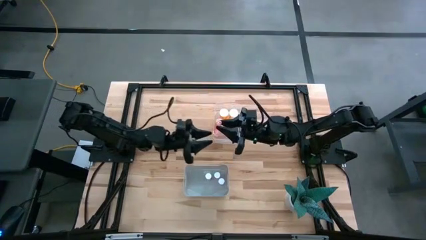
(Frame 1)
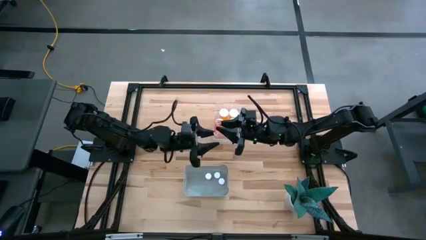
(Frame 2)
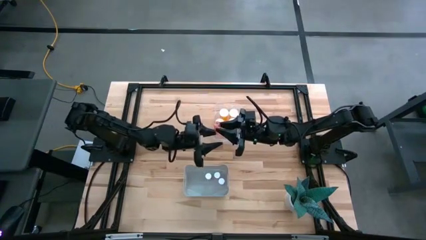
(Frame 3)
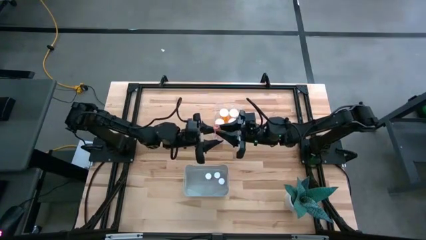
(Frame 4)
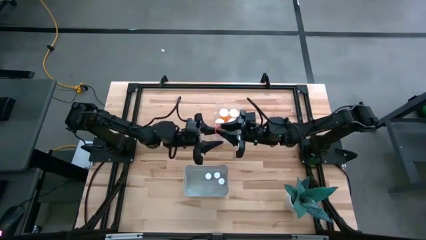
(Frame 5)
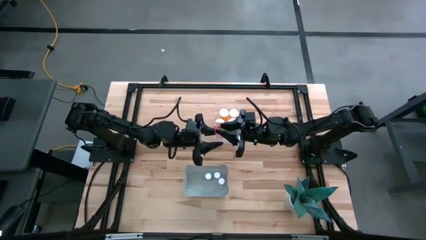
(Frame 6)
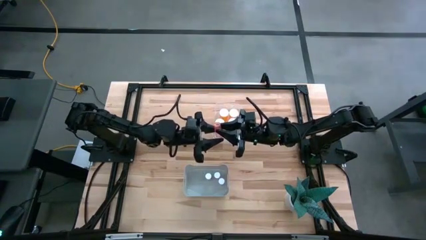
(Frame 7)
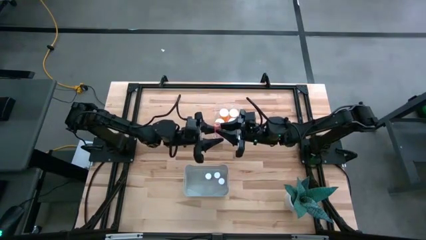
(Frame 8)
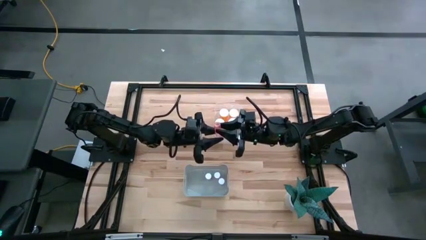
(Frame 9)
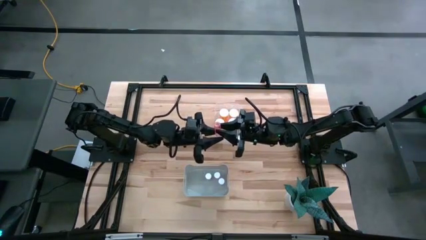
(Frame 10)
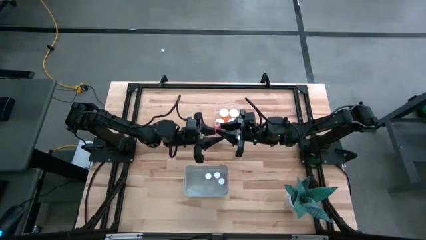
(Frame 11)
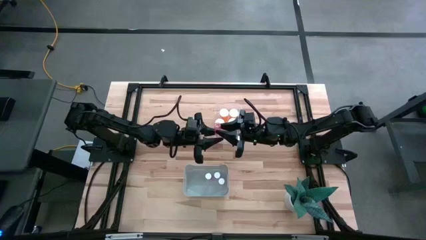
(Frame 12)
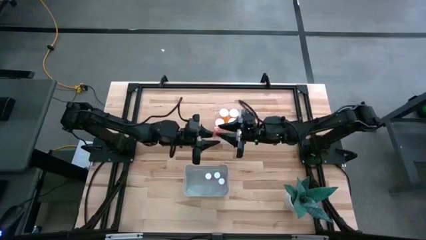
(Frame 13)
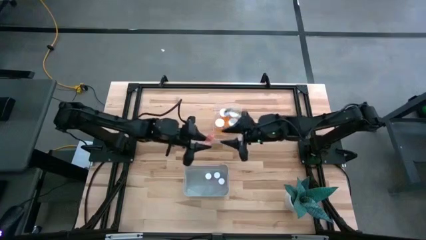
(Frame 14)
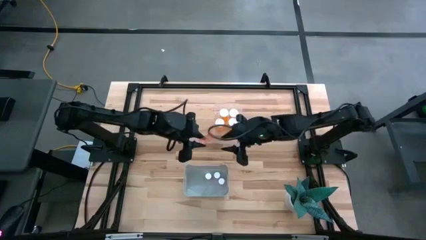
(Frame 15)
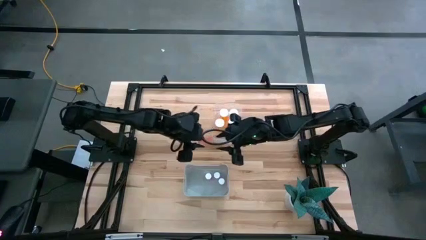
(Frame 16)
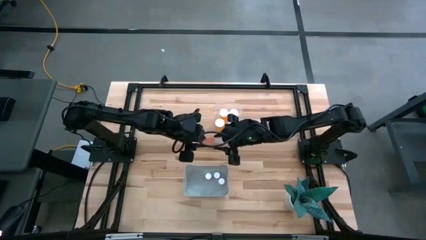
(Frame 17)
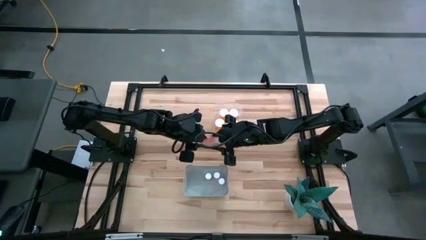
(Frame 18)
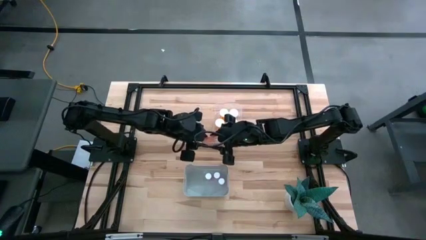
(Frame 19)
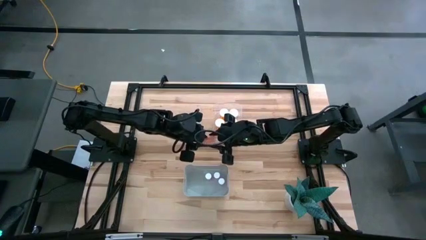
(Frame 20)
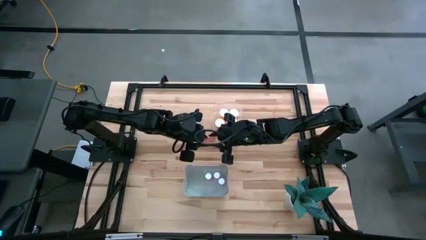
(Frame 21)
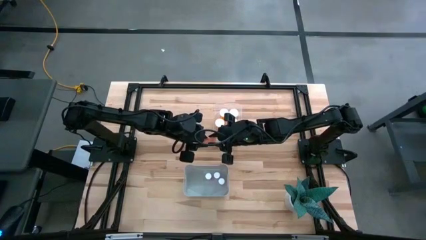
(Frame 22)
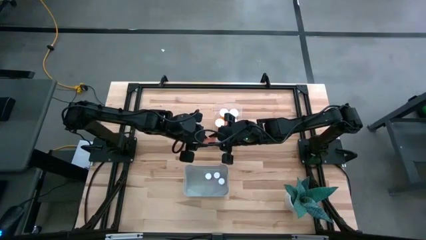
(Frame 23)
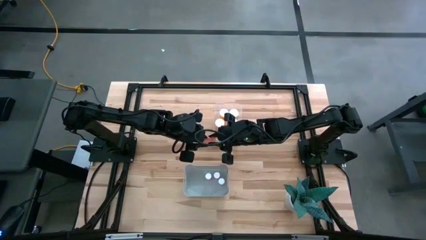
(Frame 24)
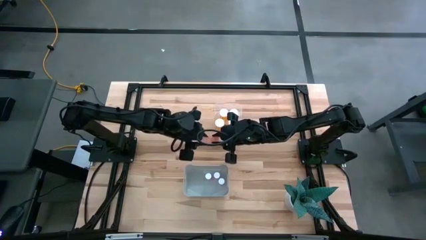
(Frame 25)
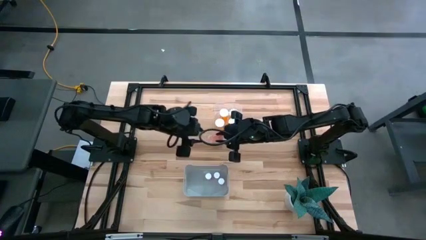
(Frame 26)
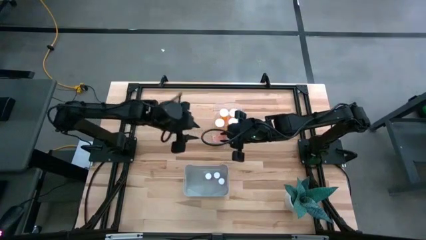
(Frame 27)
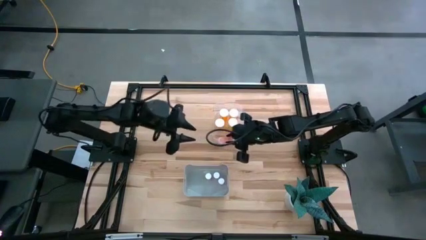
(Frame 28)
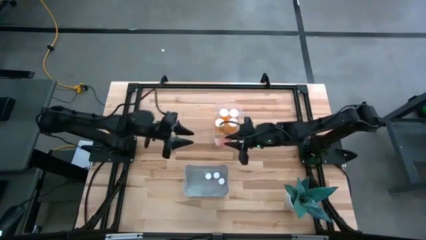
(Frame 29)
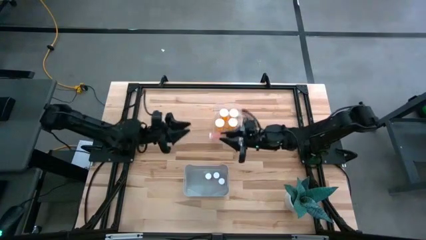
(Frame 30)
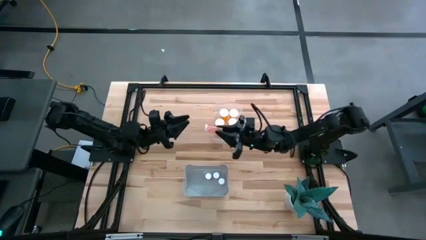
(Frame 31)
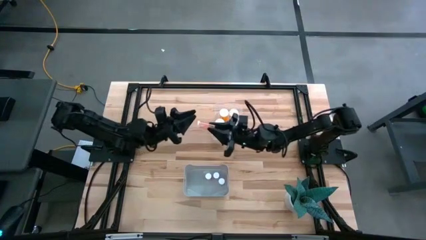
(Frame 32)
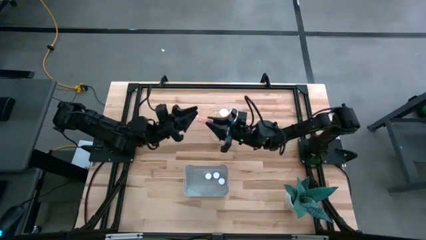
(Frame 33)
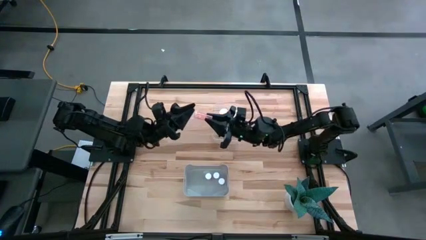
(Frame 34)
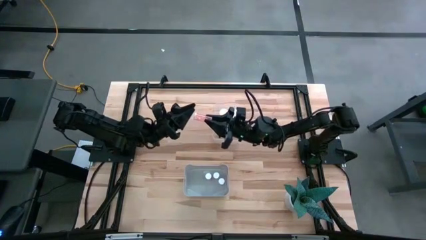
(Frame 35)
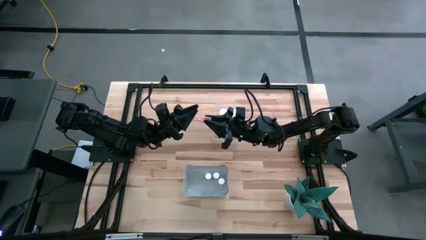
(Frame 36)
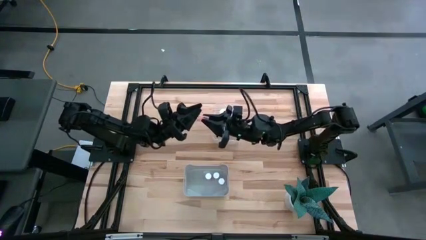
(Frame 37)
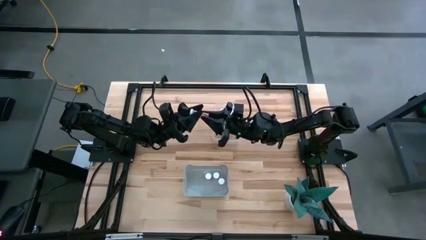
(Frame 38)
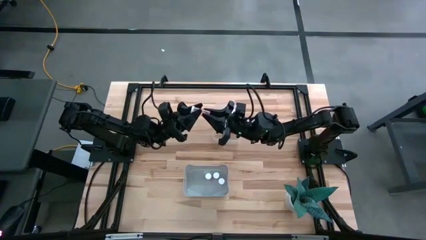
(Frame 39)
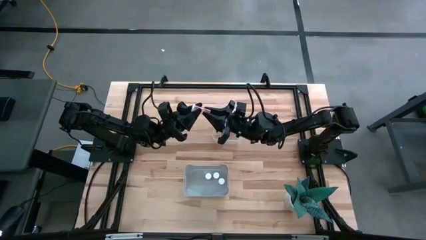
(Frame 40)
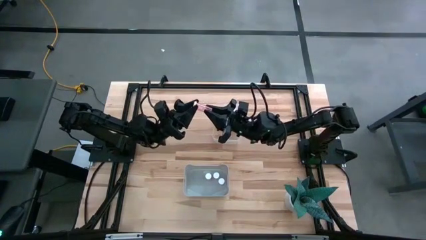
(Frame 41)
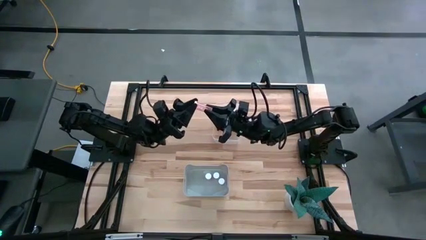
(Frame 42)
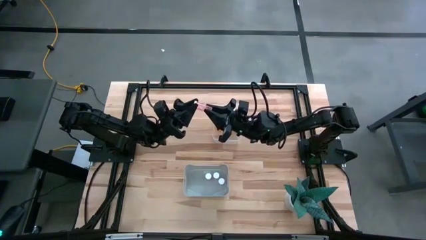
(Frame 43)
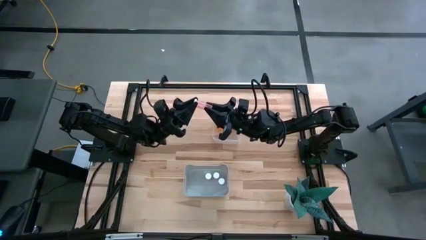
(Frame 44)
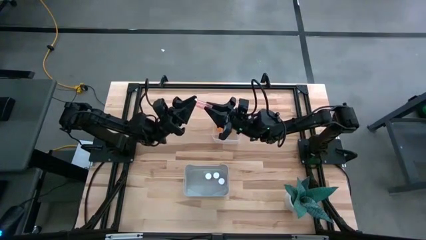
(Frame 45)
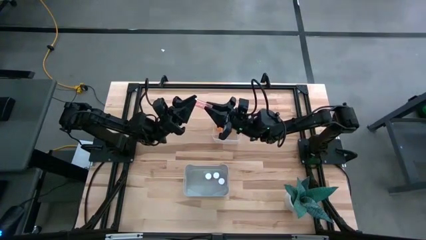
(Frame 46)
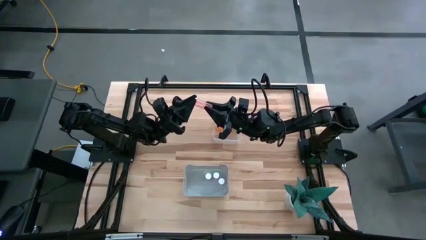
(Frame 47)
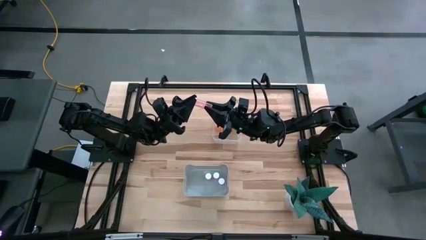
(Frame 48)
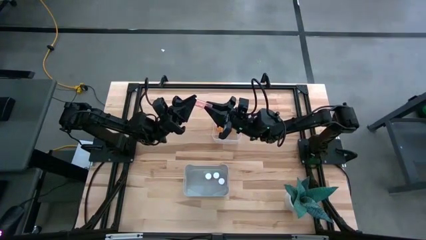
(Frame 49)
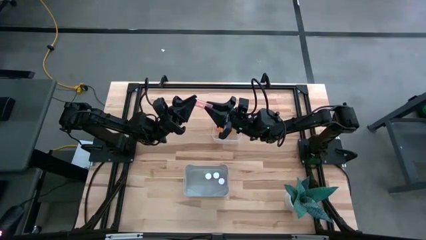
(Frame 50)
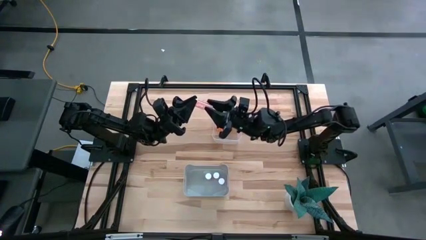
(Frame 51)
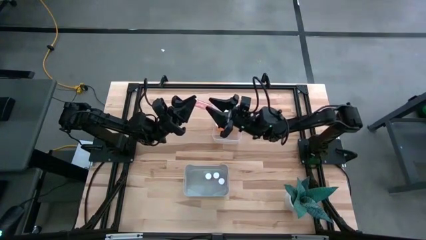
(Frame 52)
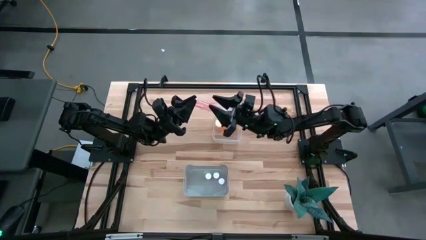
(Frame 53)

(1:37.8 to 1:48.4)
Task: Pick and place medicine bottles into bin by pill shape (circle, oval)
Put the pink pill bottle into the gray bin

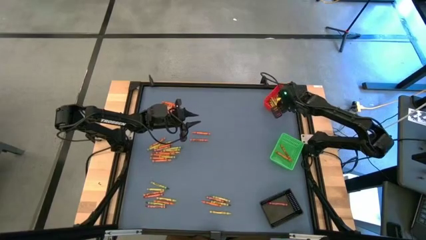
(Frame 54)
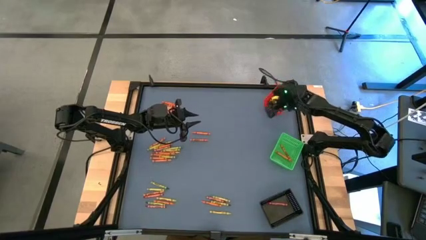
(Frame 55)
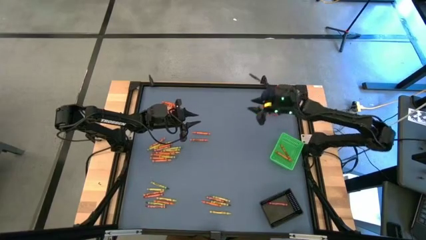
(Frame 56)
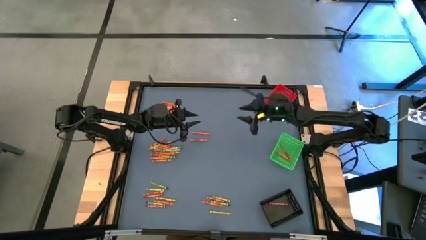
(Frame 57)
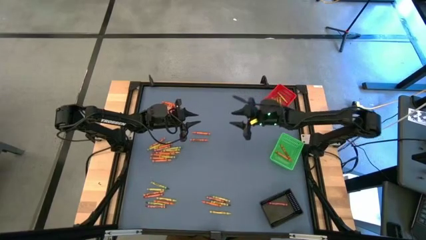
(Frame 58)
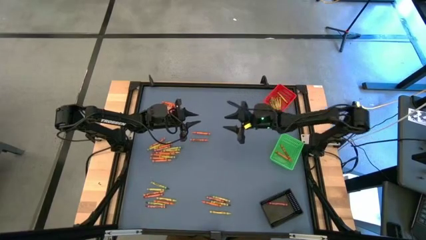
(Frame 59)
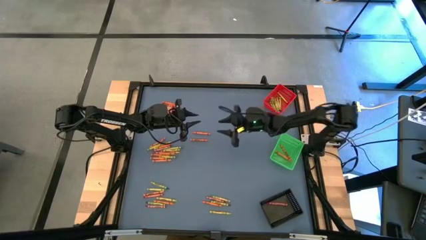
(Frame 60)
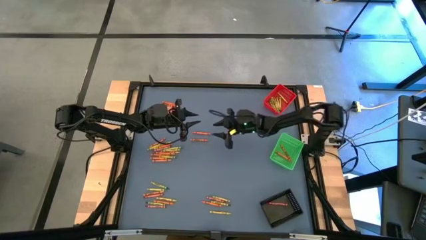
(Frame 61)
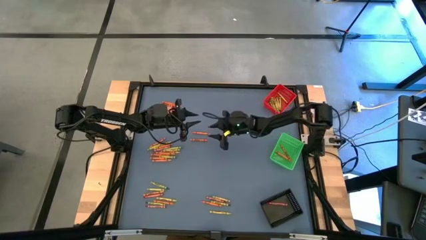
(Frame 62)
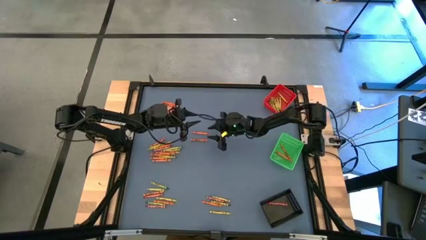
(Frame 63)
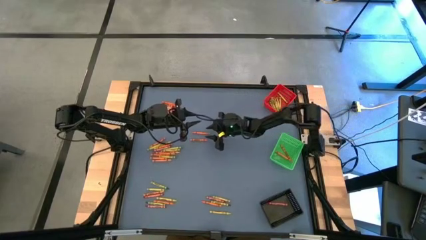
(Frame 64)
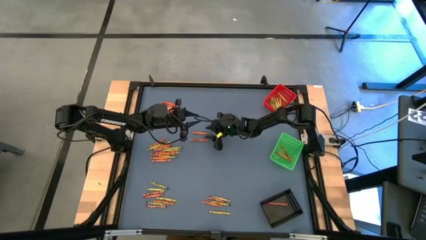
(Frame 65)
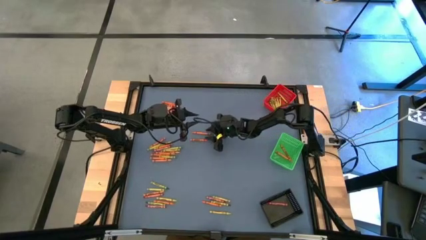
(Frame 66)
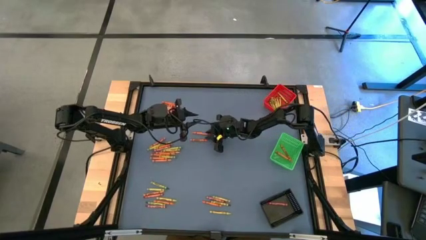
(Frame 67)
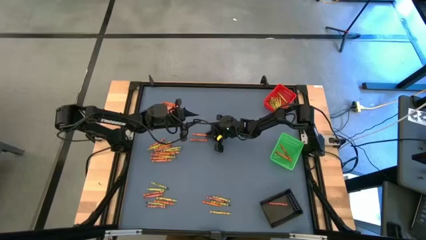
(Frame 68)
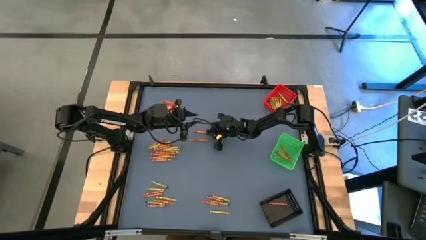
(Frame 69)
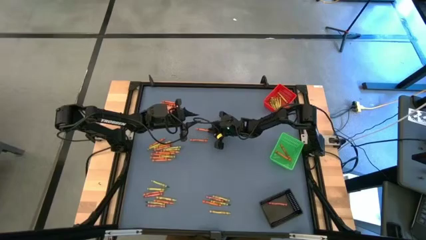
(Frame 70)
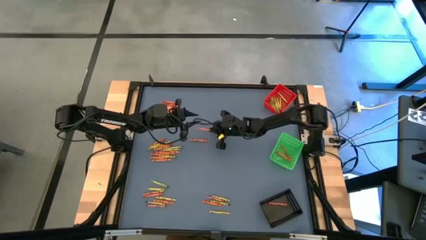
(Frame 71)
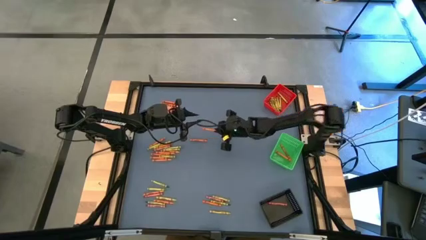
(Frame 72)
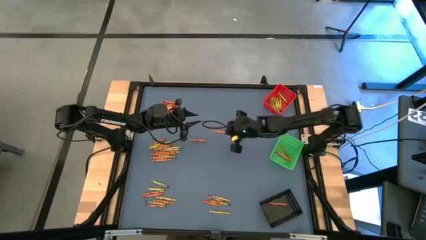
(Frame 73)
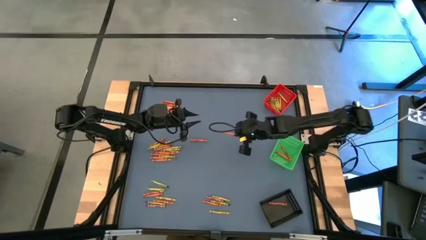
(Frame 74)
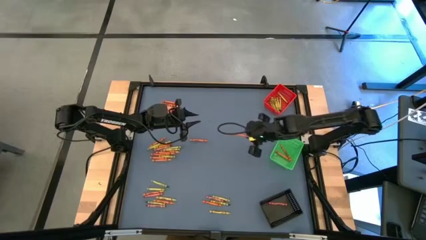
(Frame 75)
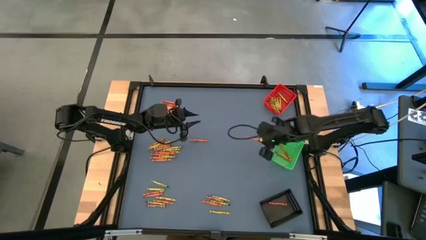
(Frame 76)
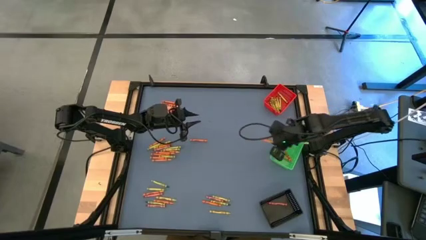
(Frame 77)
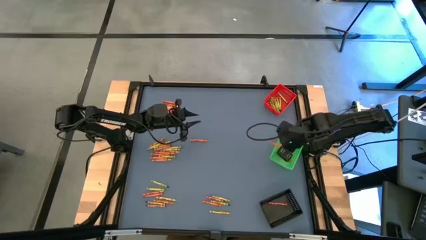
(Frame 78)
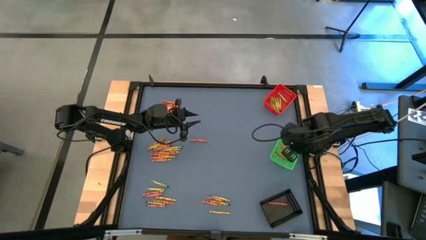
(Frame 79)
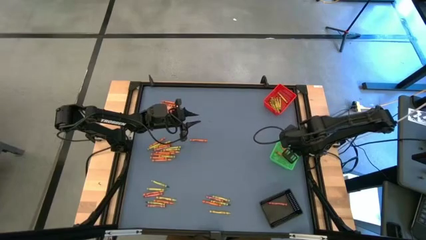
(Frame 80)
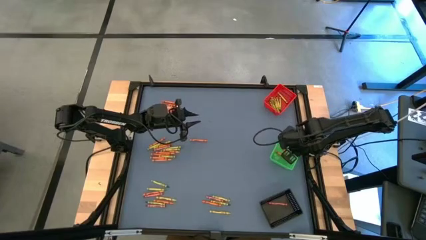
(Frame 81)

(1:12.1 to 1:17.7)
Task: Sort crayons
Put the orange crayon into the green bin
